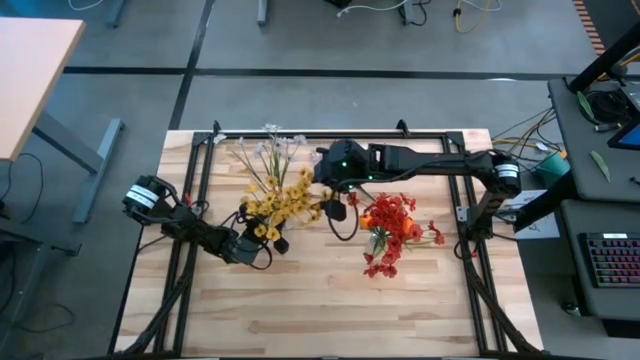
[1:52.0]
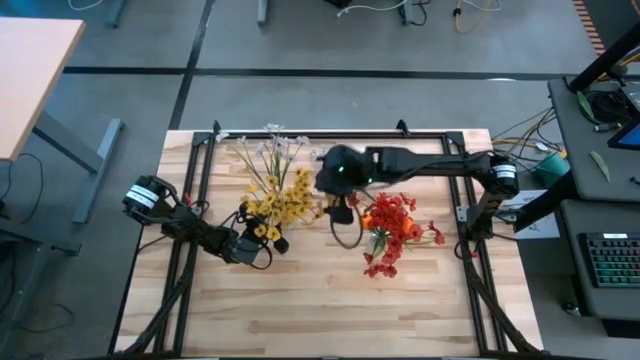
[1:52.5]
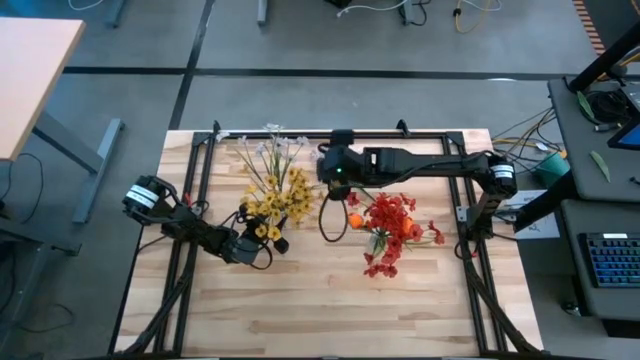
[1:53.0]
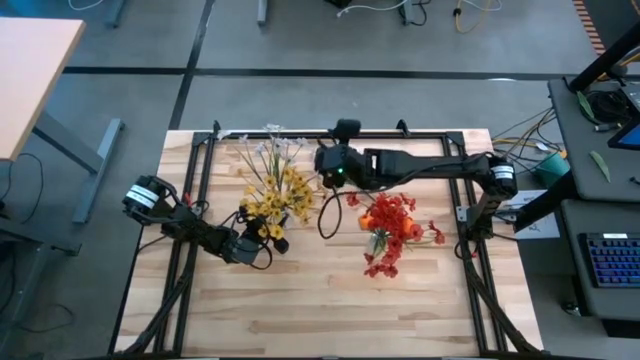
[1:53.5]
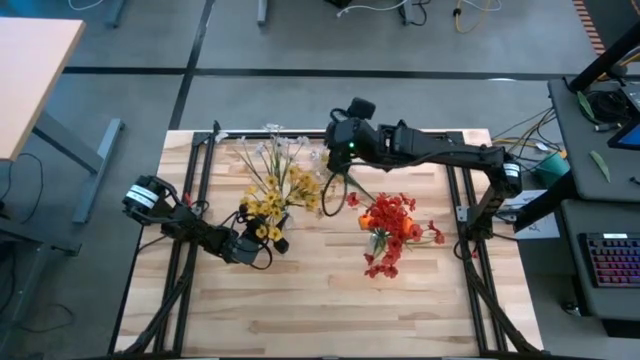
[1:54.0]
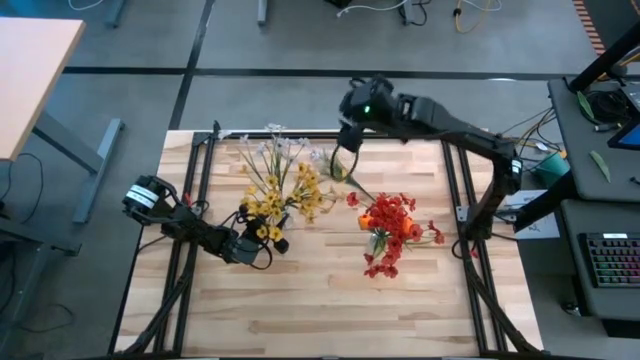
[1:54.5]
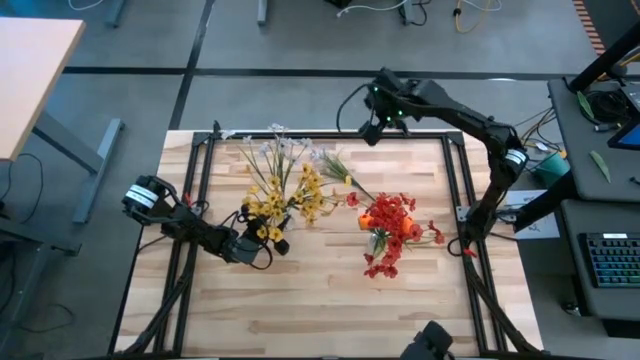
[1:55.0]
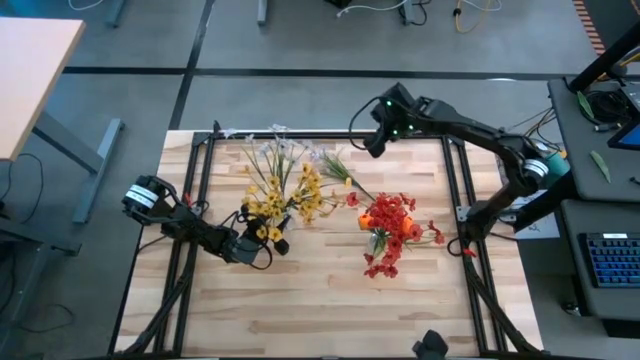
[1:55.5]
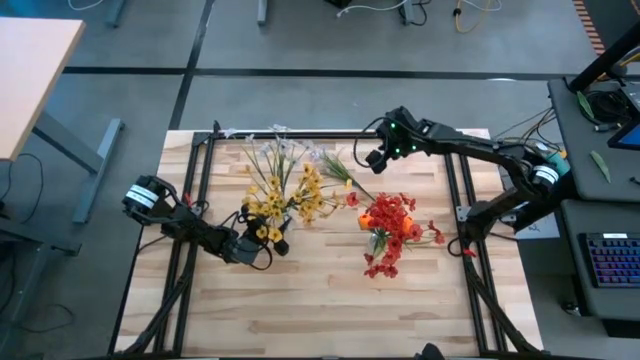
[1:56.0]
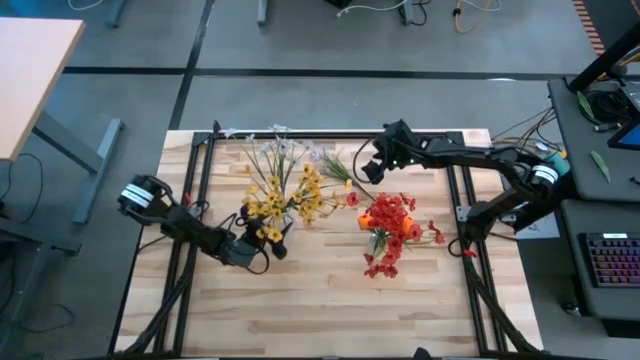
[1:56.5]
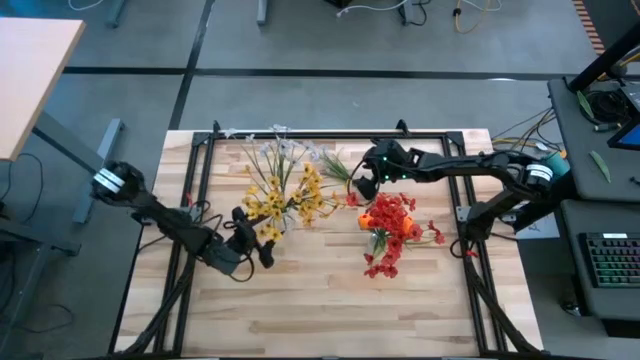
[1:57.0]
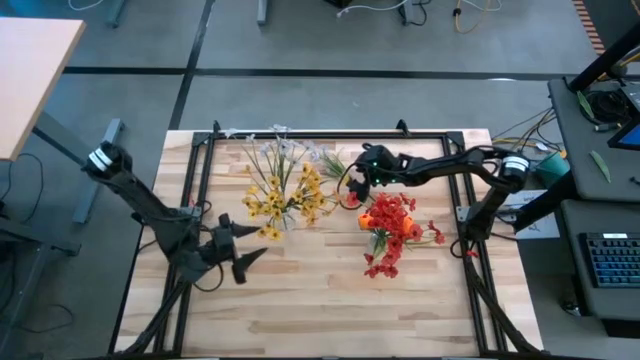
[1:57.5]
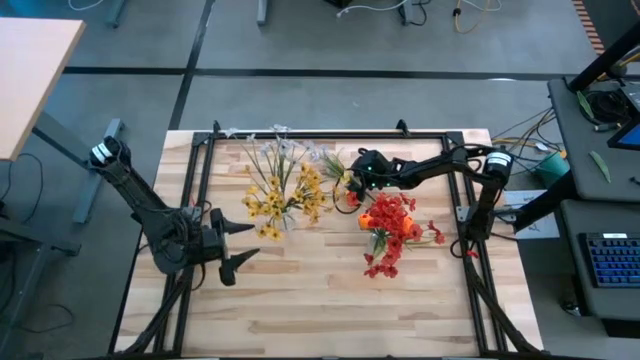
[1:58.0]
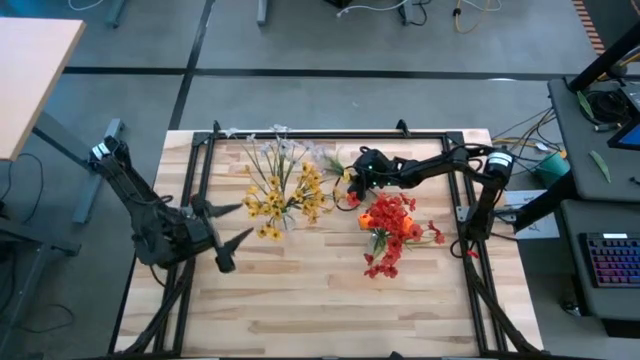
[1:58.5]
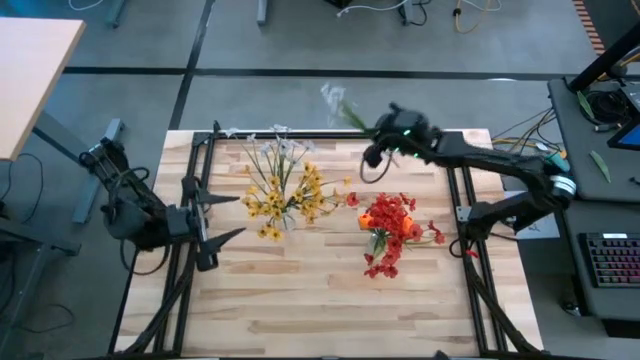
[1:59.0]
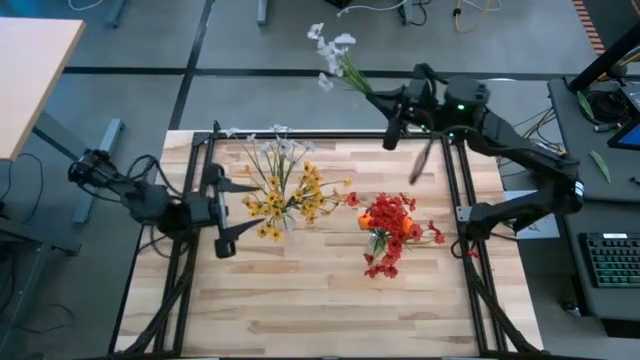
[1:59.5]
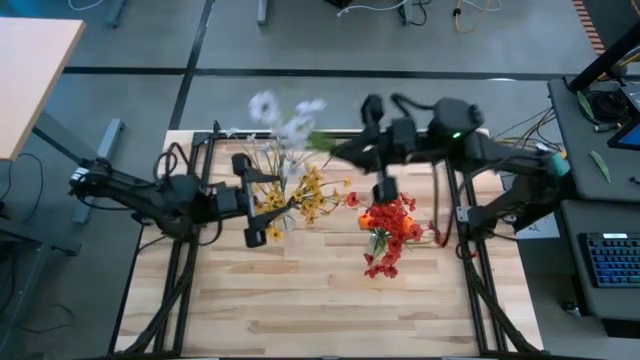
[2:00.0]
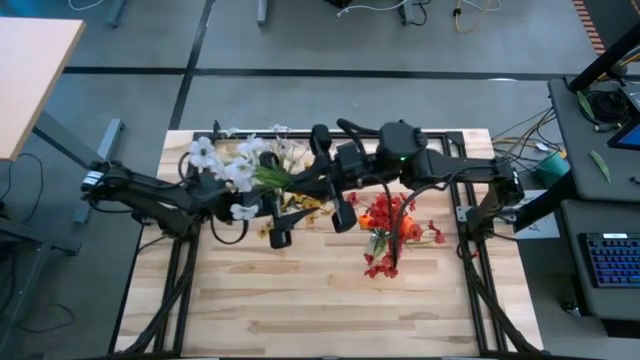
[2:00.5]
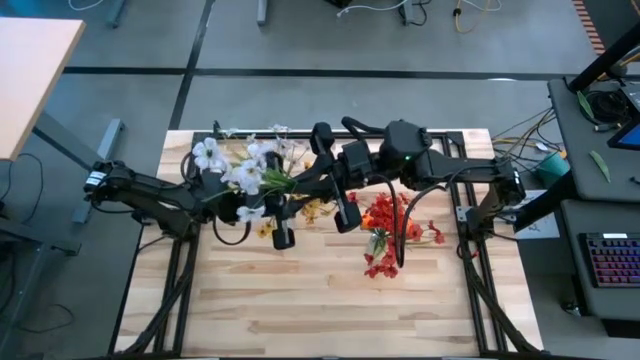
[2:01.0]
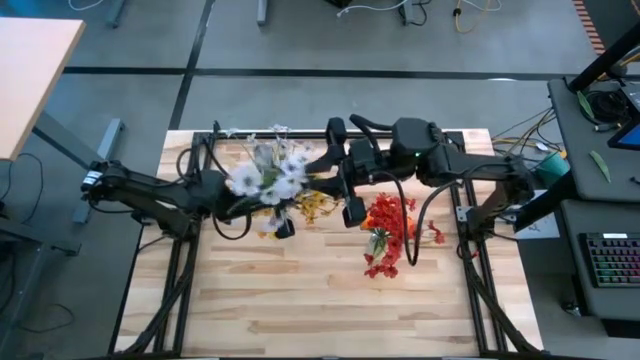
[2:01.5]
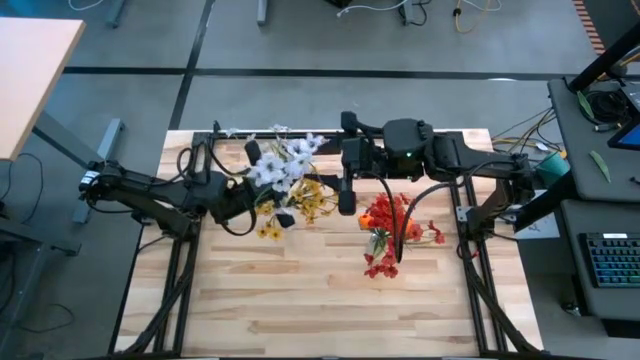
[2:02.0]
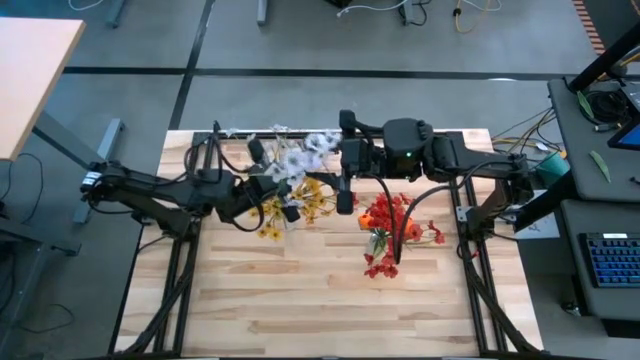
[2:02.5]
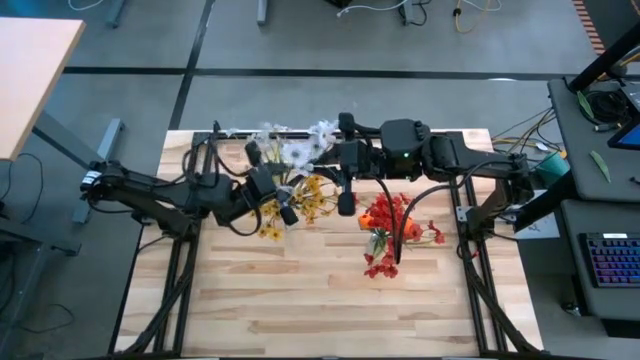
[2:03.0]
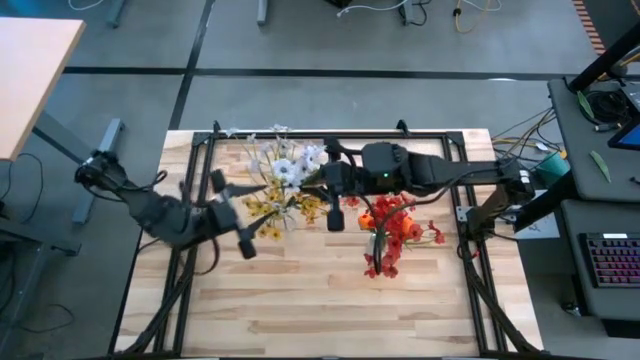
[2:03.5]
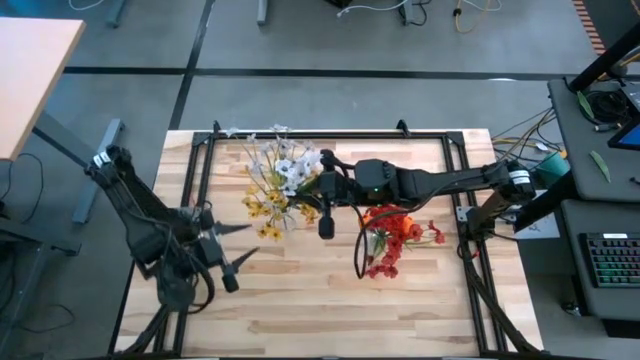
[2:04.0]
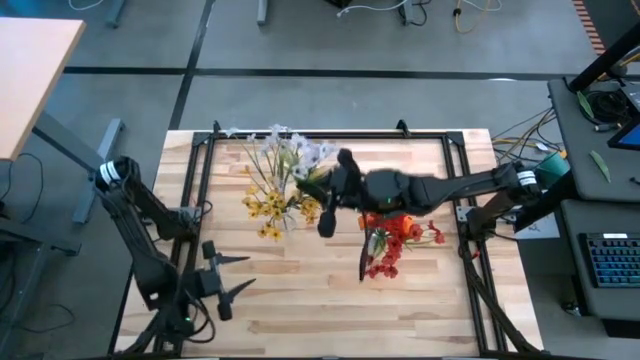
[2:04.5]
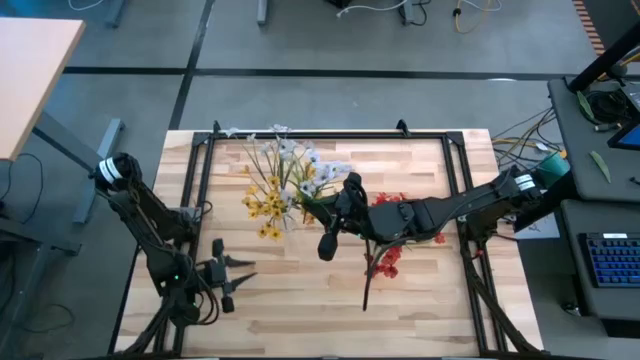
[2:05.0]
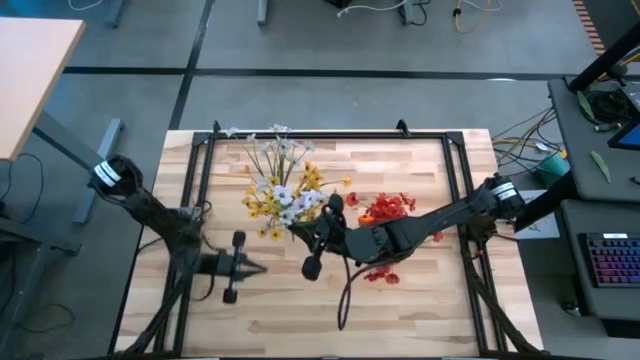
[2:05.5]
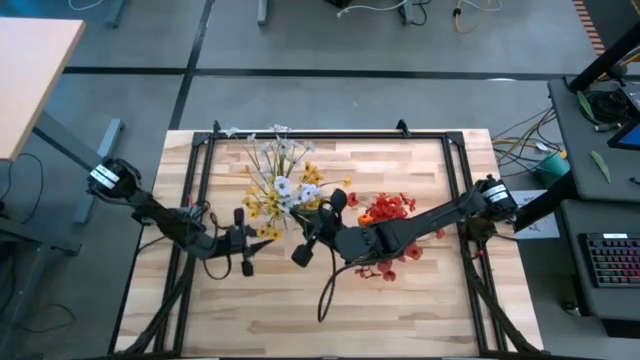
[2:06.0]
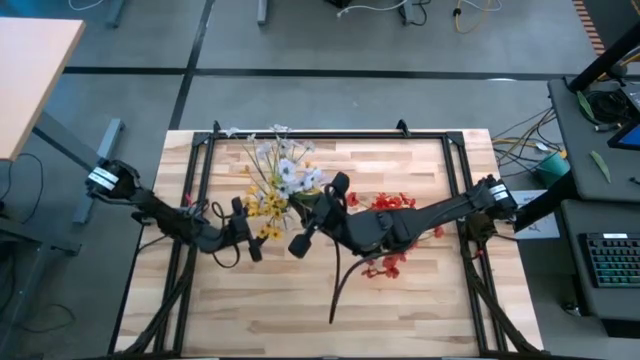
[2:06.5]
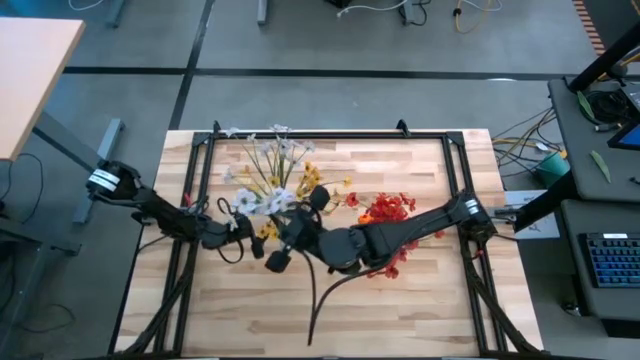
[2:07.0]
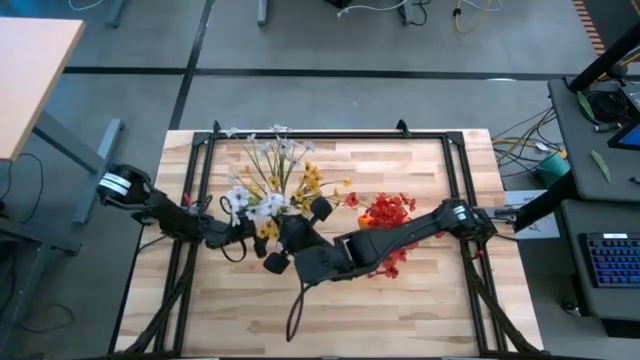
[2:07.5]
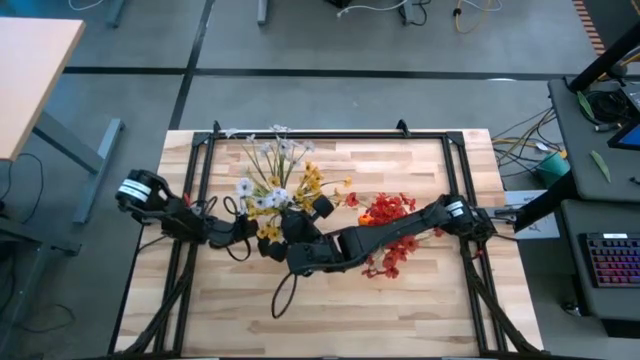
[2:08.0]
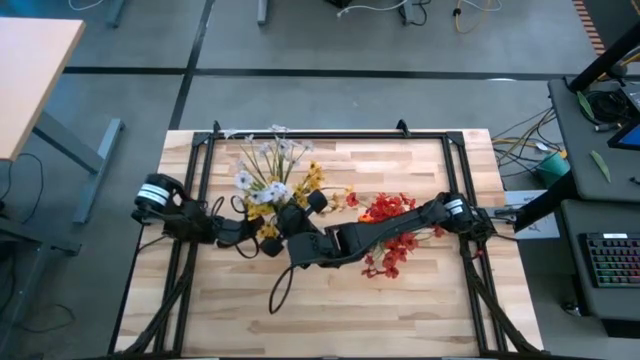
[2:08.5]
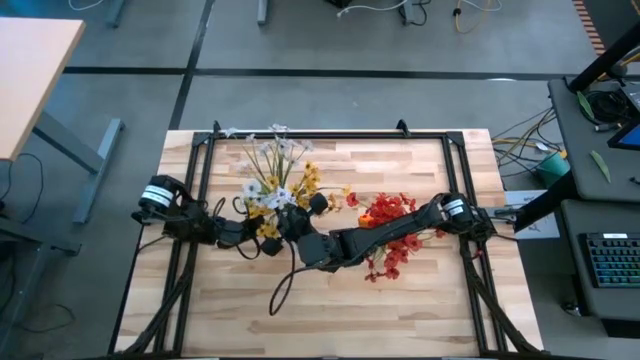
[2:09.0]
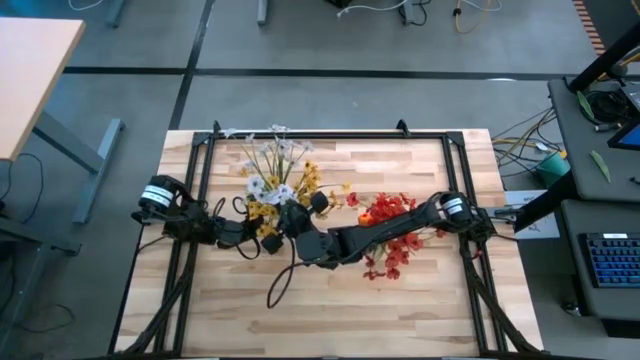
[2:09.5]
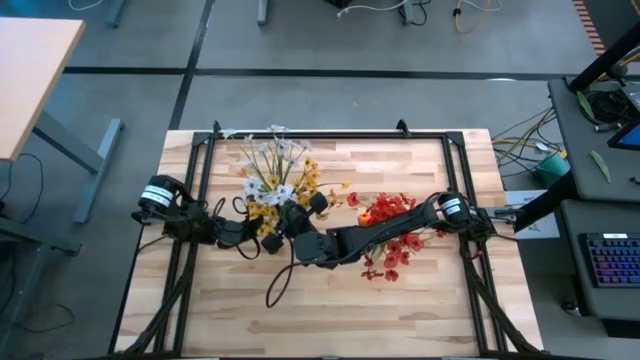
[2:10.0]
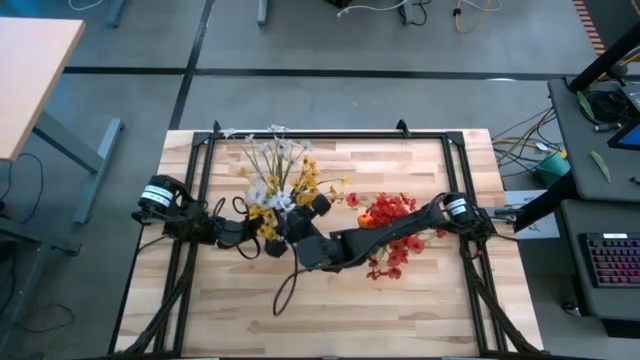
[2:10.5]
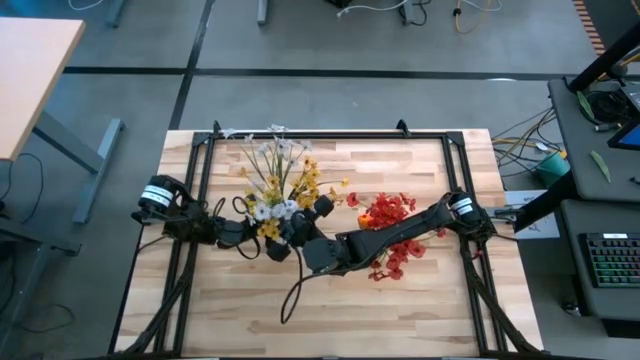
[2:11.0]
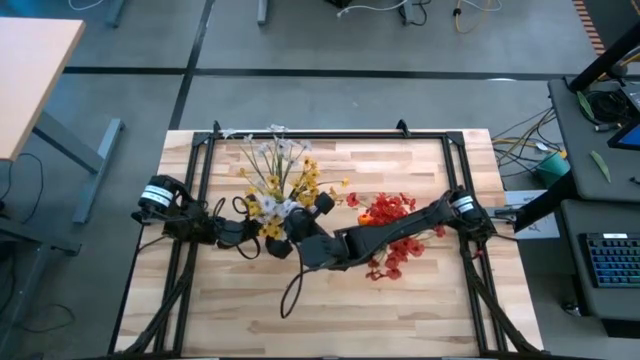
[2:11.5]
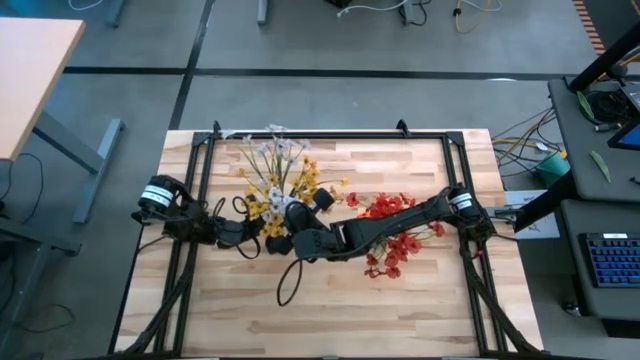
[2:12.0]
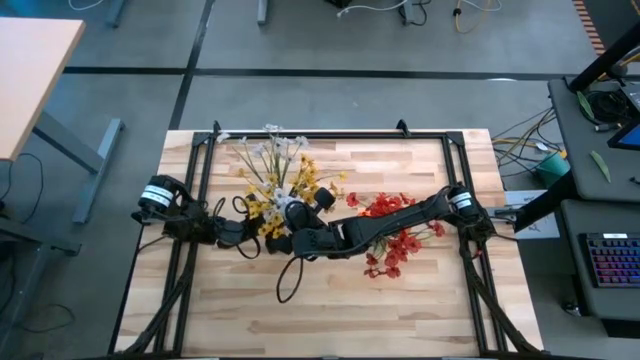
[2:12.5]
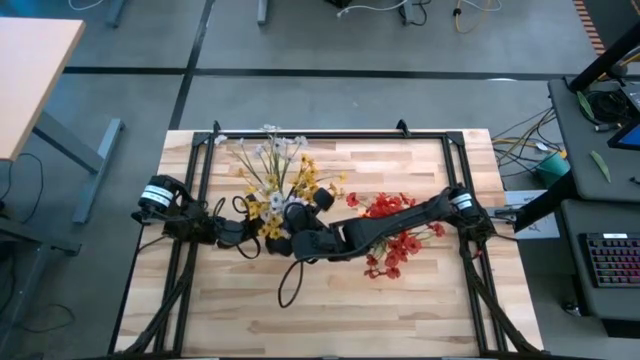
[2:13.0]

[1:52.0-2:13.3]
Task: Sort flowers into vase by color
Put the white flower into the left transparent vase
